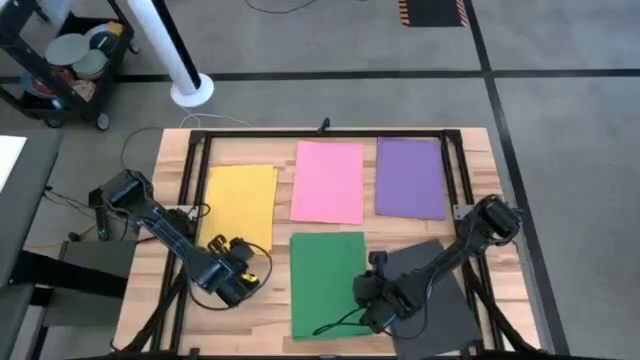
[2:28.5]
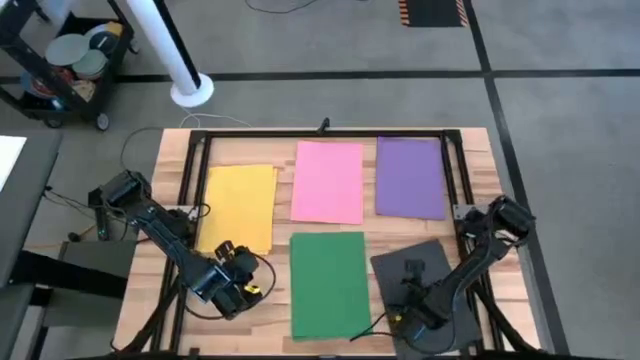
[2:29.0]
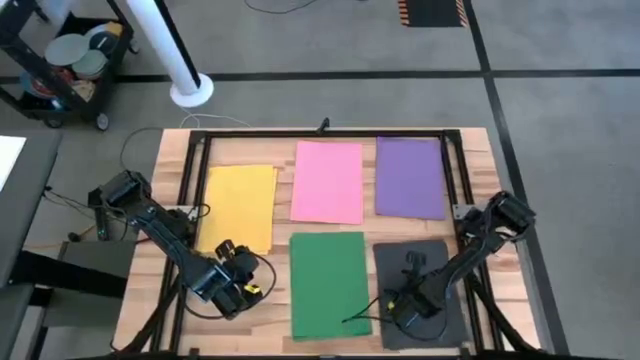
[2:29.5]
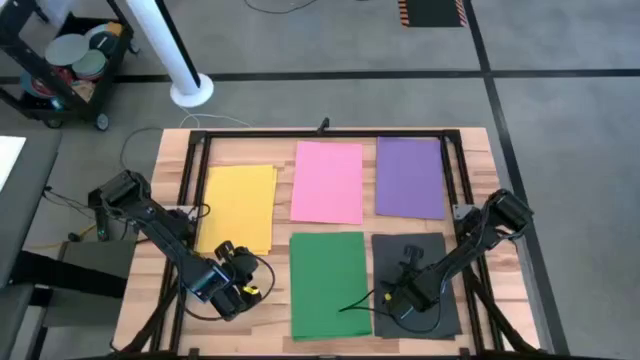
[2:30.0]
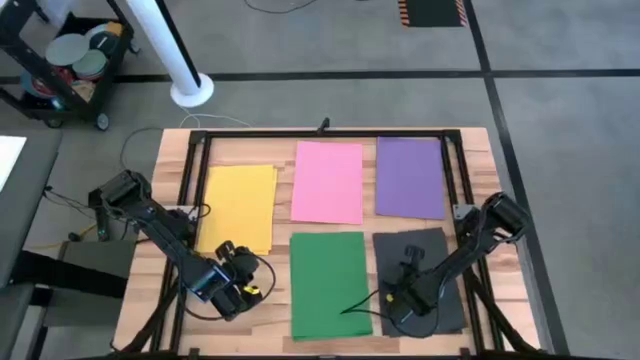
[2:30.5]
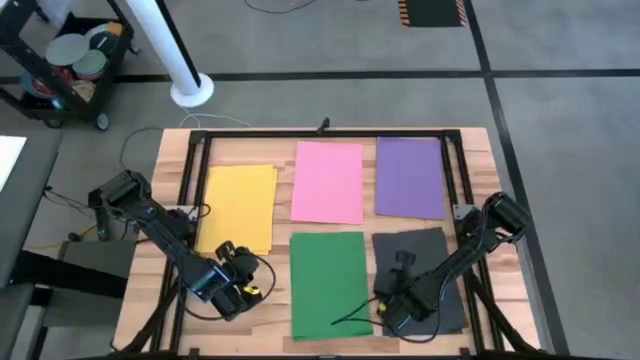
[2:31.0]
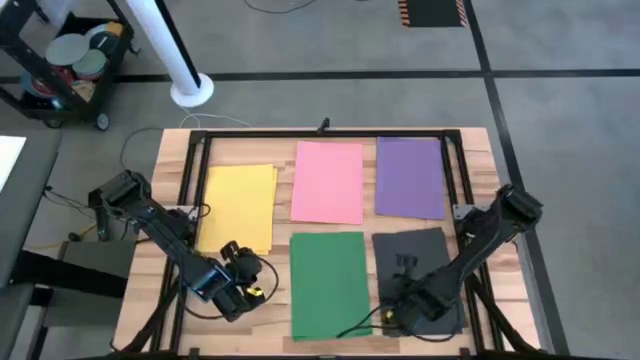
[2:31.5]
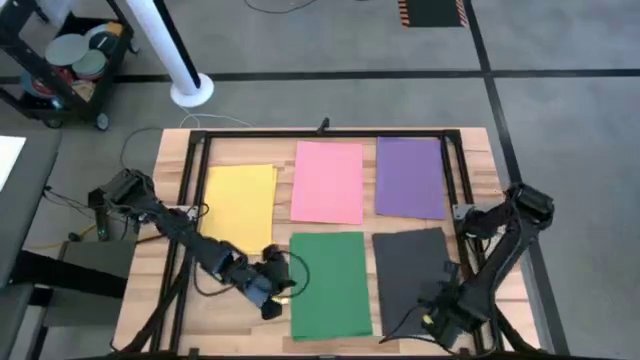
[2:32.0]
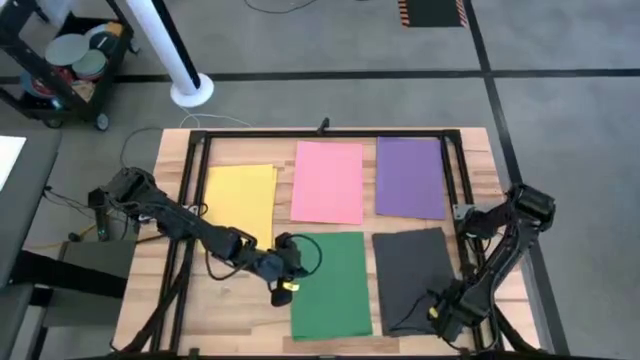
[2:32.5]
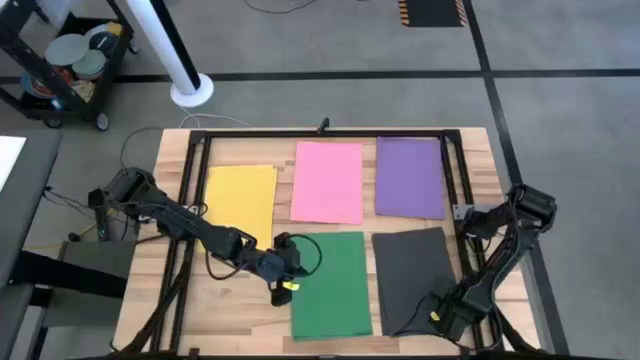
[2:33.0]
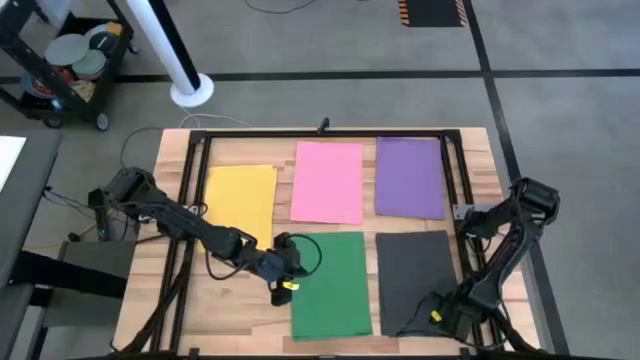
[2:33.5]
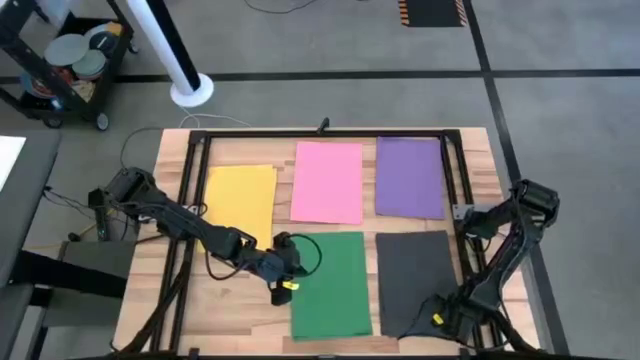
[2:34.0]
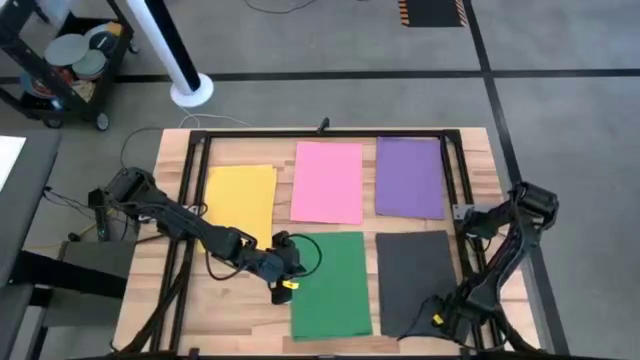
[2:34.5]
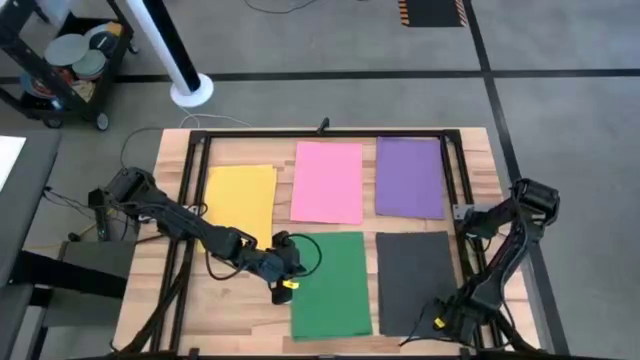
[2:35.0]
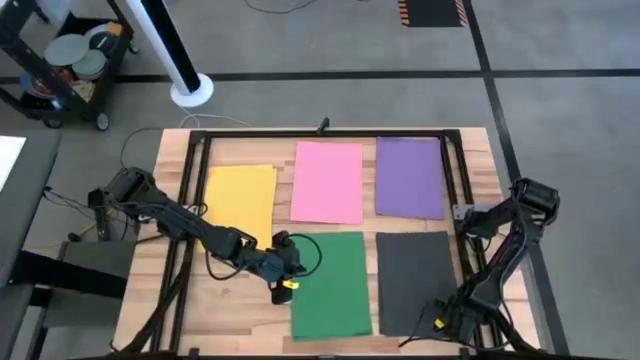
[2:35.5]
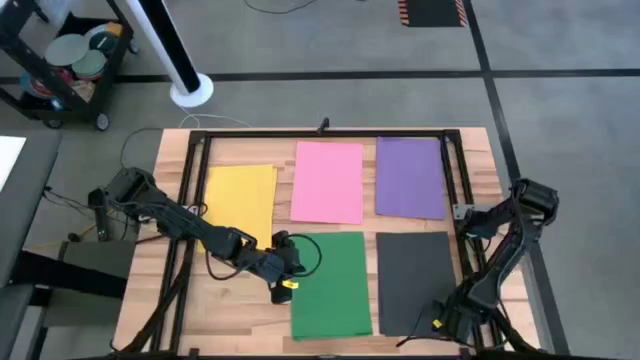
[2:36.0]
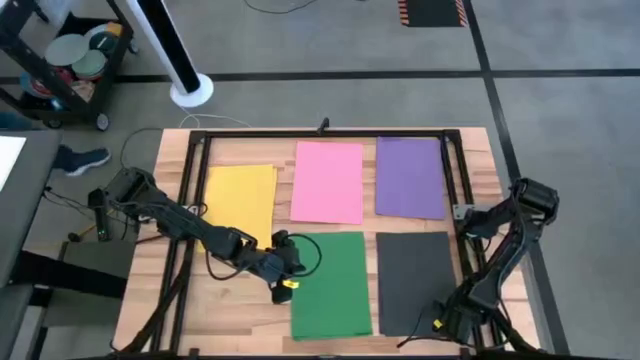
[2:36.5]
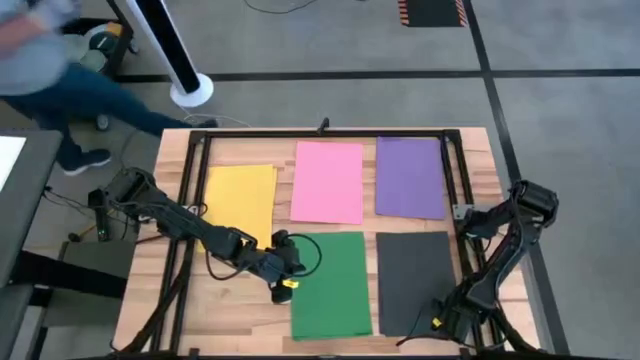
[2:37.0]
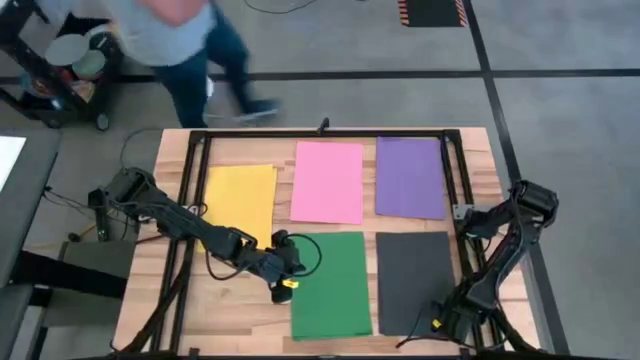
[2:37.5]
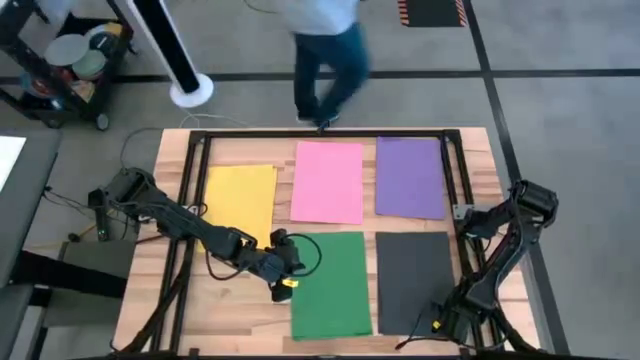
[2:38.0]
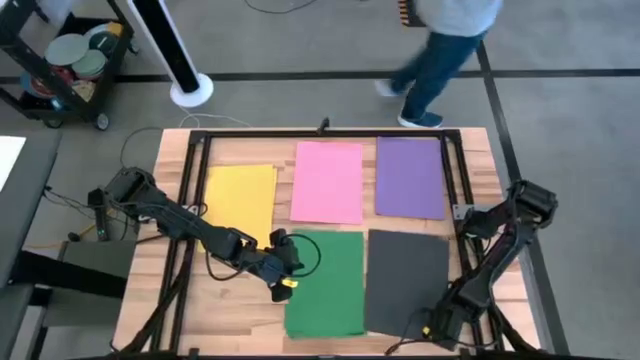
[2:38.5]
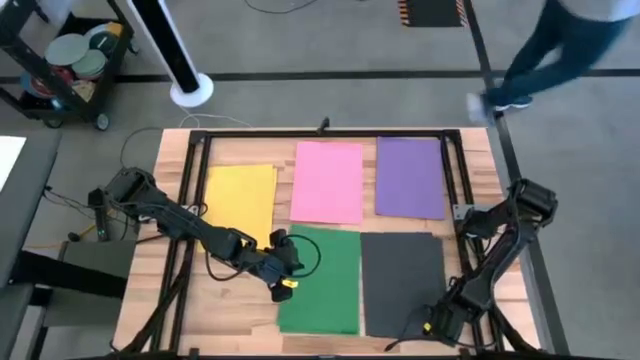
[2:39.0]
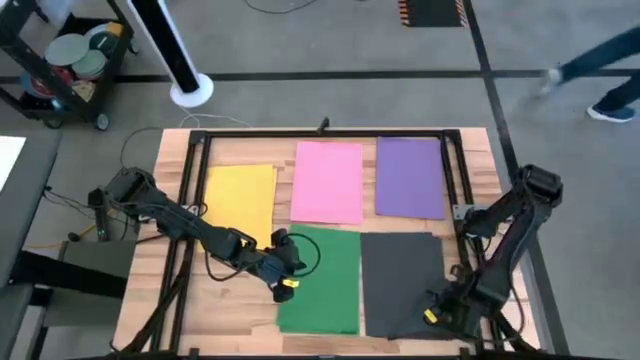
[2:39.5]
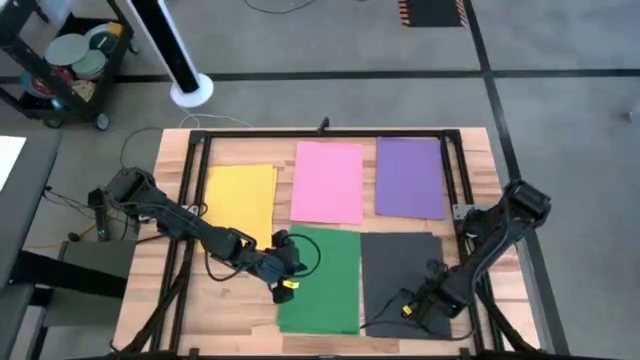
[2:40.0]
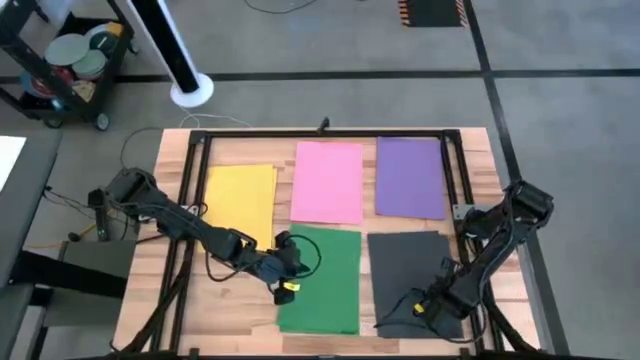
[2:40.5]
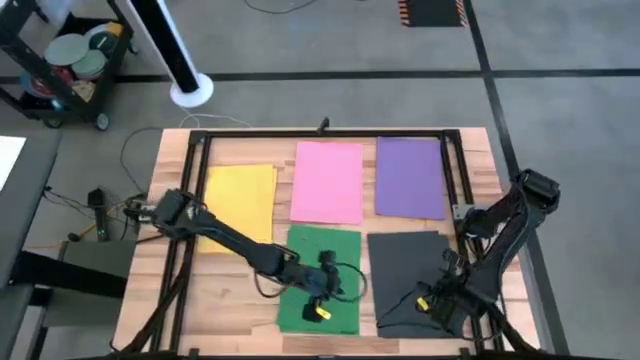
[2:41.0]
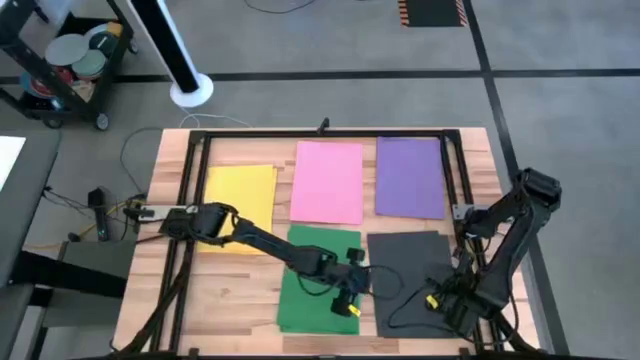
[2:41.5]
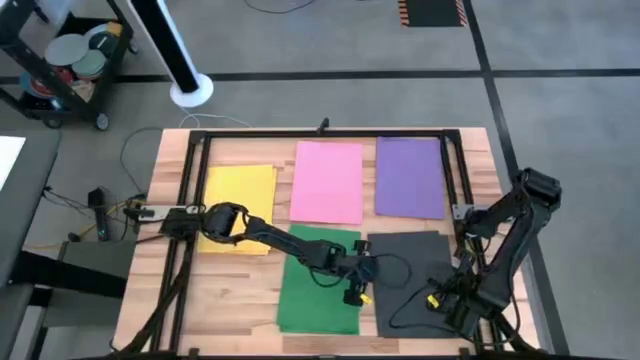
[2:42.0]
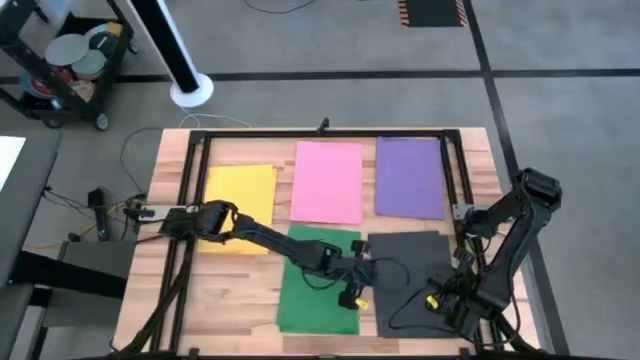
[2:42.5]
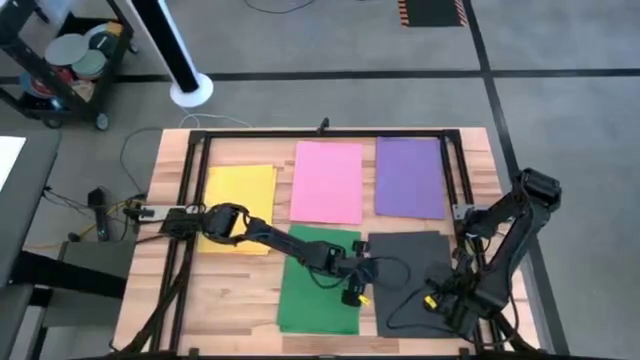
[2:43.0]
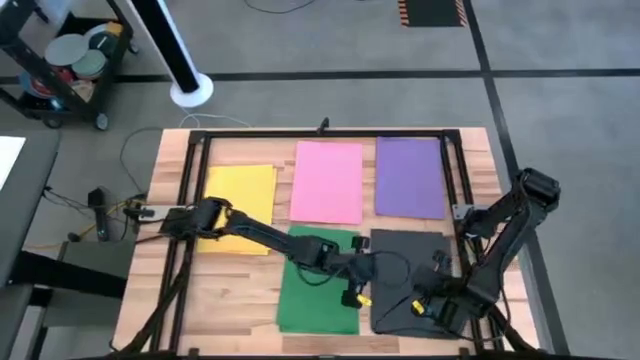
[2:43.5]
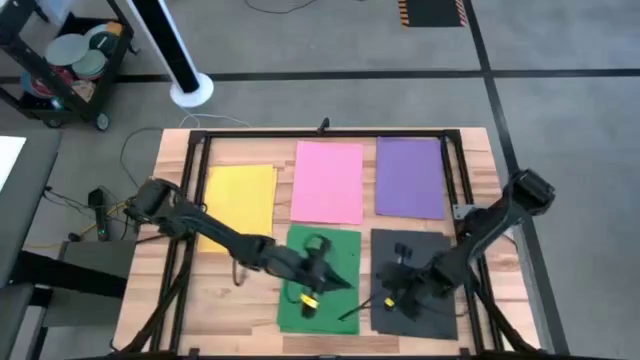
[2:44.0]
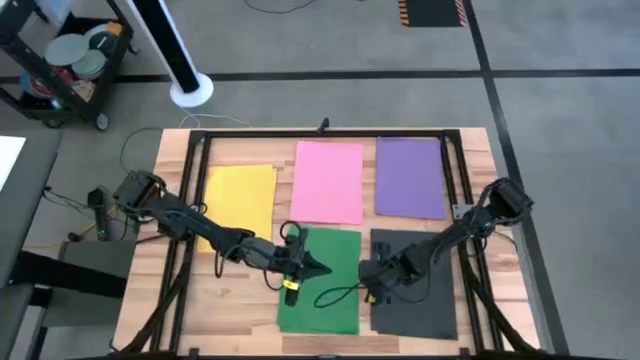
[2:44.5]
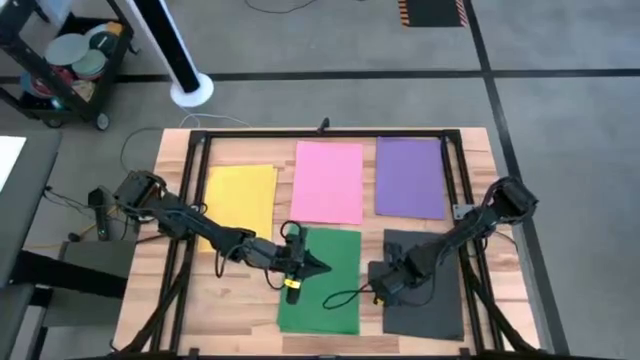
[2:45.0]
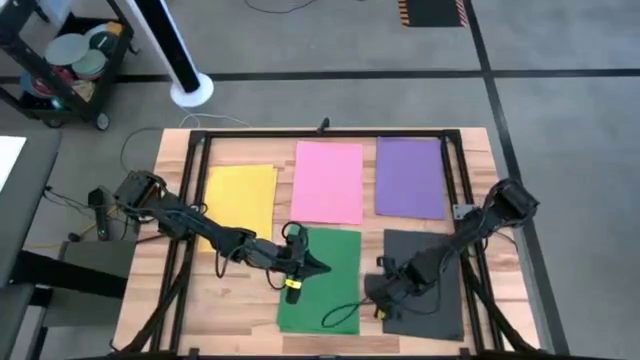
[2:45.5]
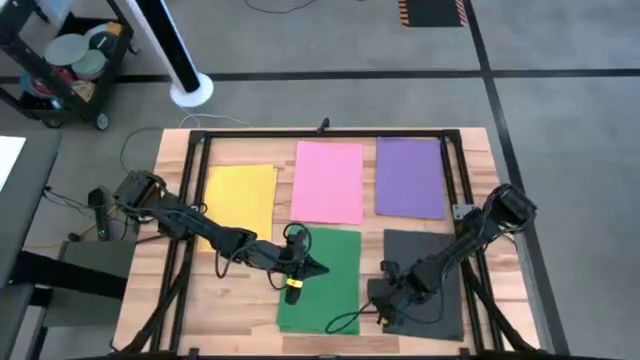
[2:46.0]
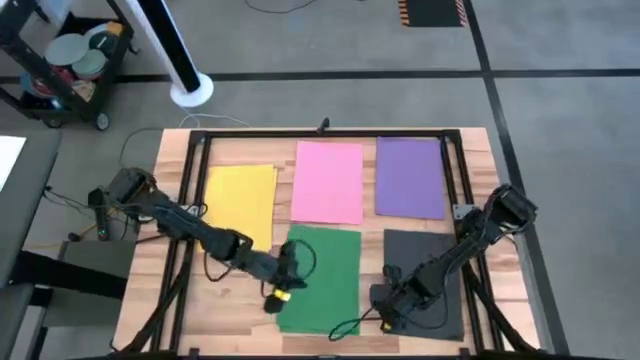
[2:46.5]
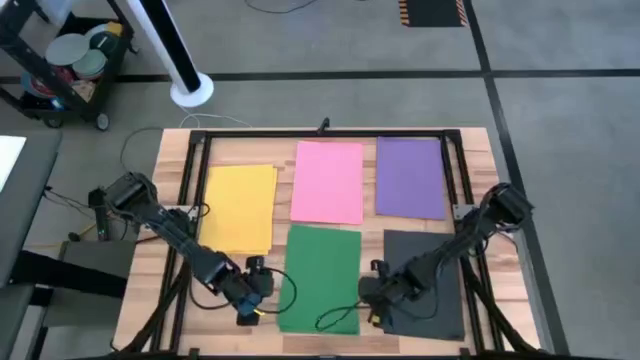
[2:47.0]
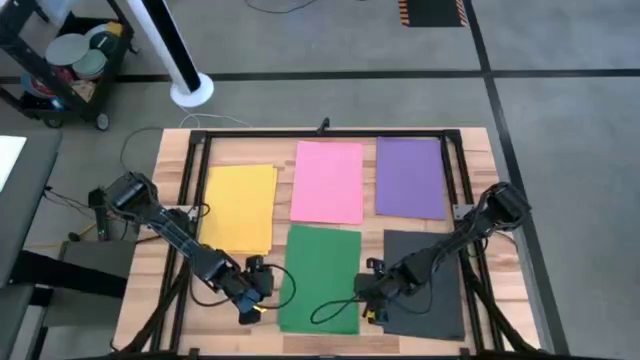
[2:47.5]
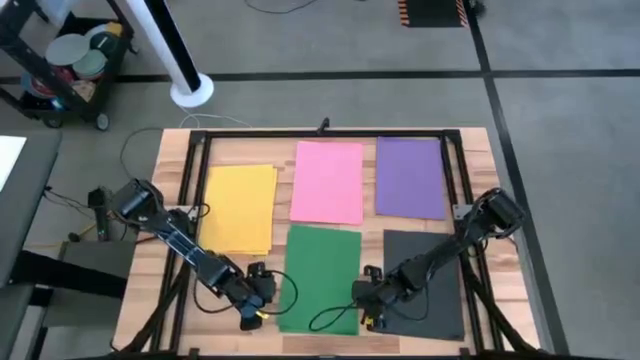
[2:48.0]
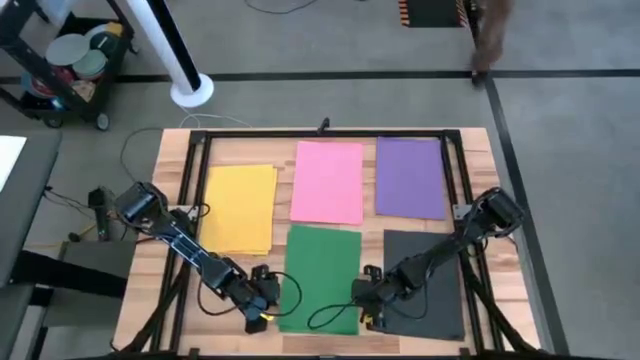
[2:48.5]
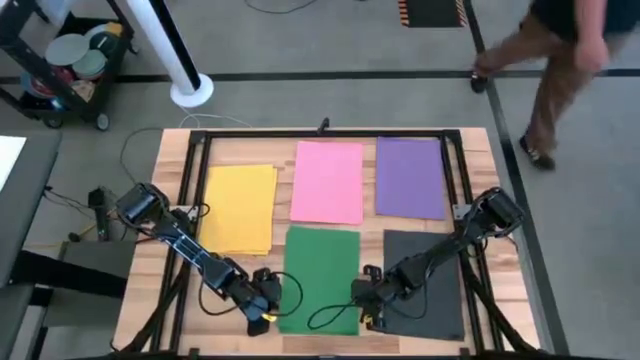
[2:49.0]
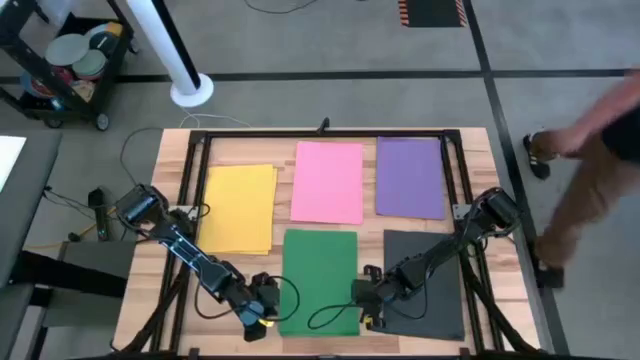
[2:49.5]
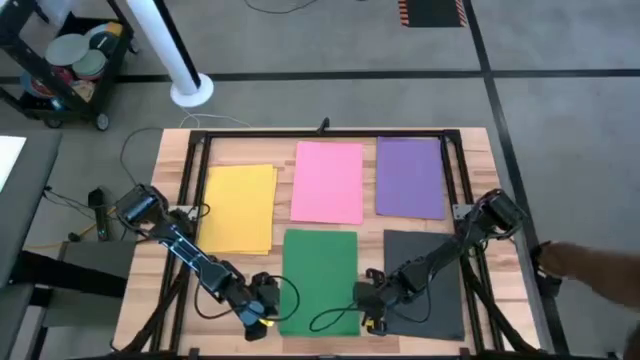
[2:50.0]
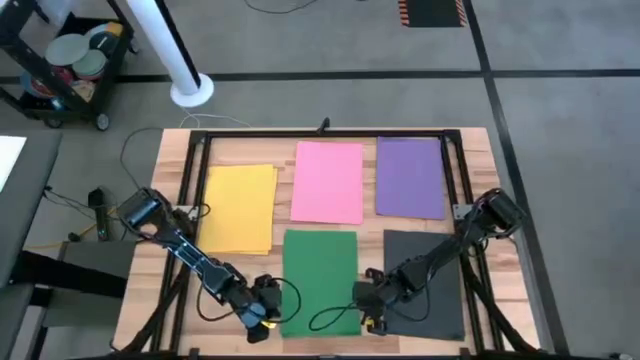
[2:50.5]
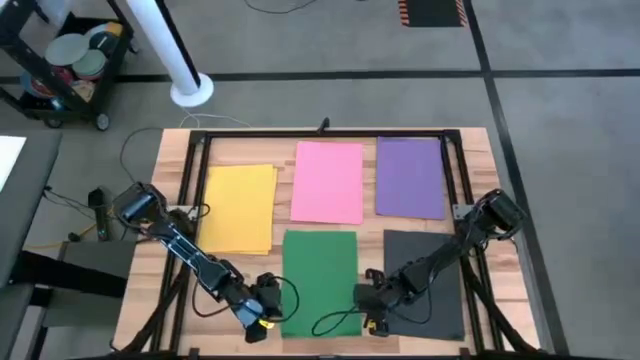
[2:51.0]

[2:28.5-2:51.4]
Task: Organize paper
Adjust the stacked papers on the table
